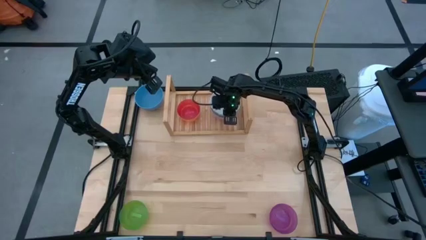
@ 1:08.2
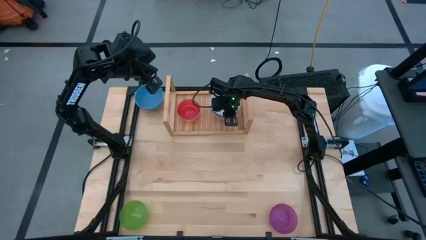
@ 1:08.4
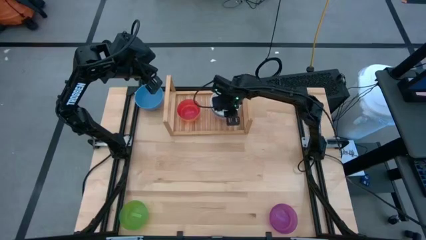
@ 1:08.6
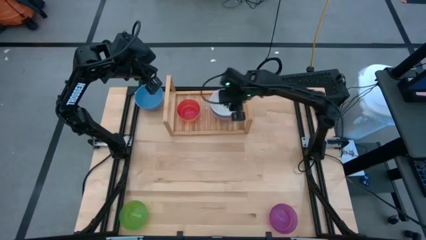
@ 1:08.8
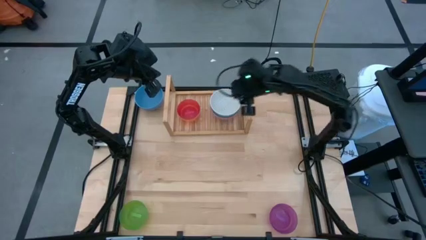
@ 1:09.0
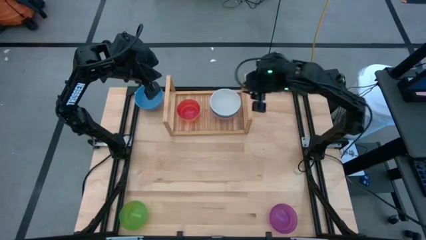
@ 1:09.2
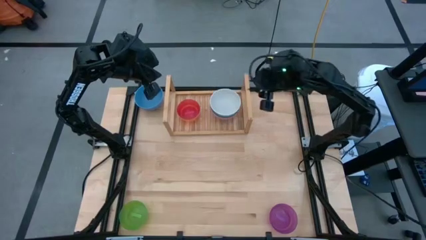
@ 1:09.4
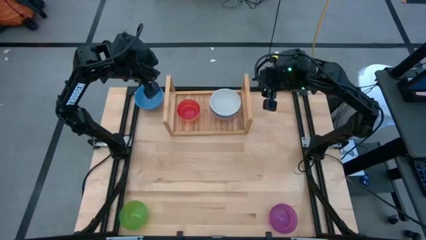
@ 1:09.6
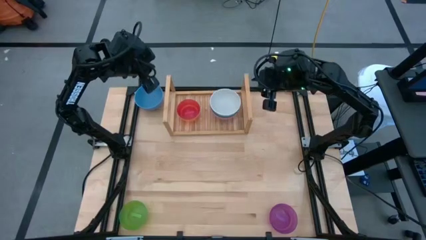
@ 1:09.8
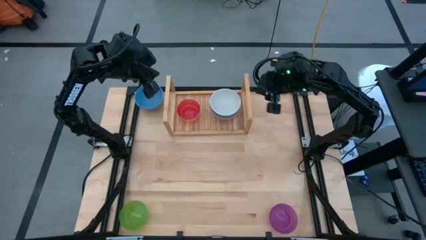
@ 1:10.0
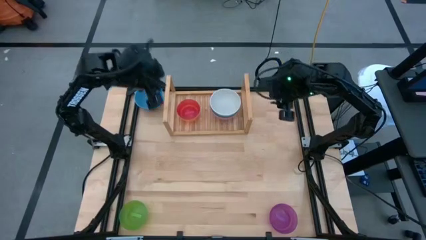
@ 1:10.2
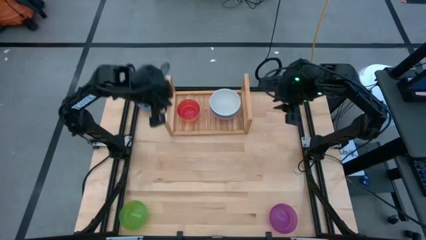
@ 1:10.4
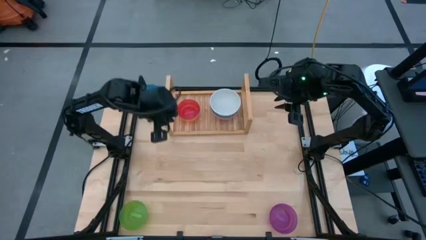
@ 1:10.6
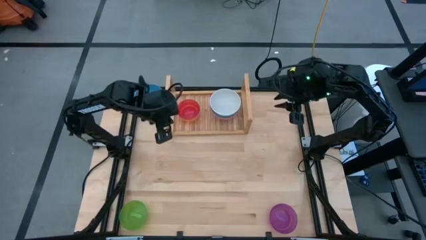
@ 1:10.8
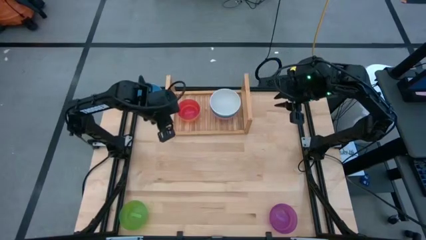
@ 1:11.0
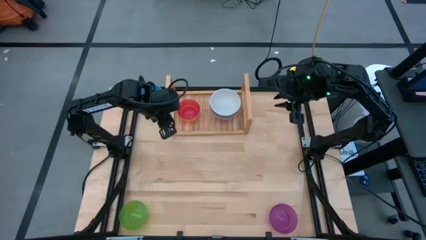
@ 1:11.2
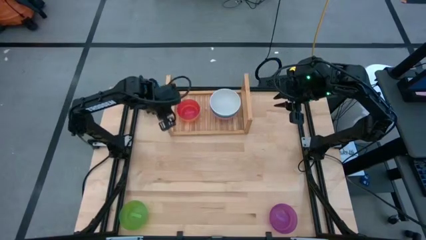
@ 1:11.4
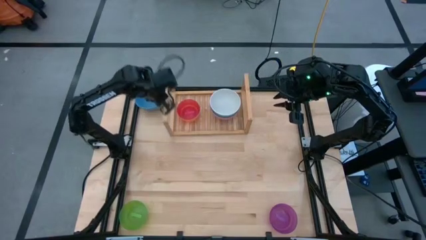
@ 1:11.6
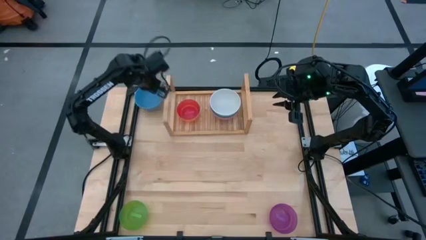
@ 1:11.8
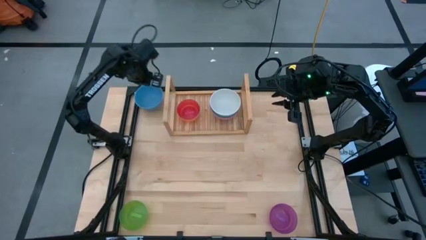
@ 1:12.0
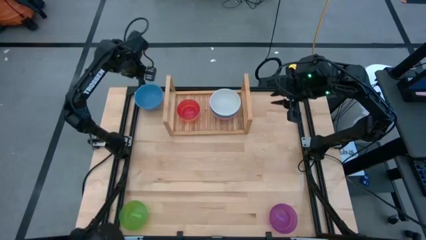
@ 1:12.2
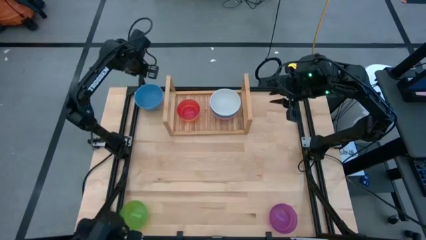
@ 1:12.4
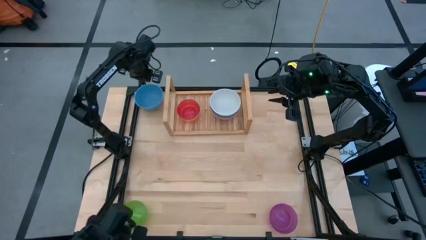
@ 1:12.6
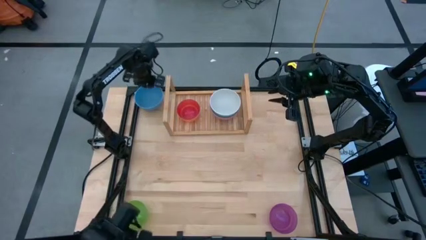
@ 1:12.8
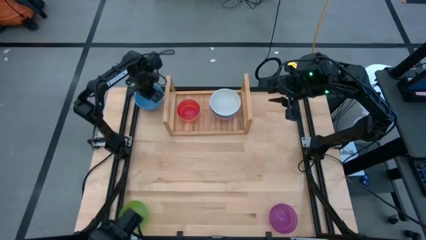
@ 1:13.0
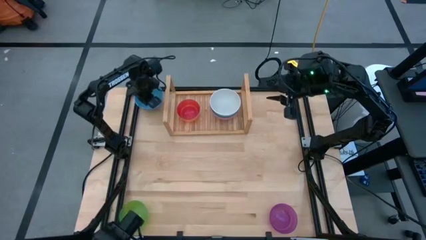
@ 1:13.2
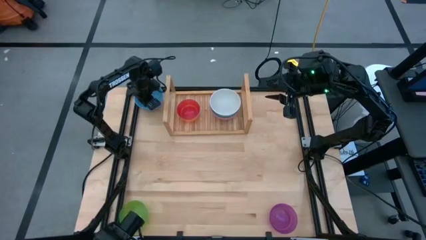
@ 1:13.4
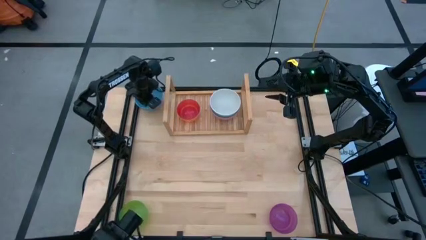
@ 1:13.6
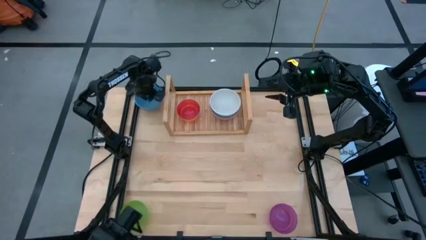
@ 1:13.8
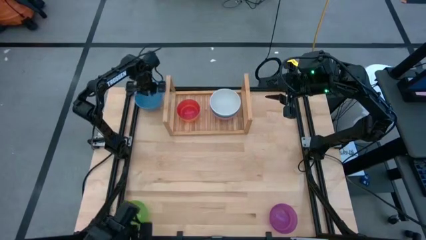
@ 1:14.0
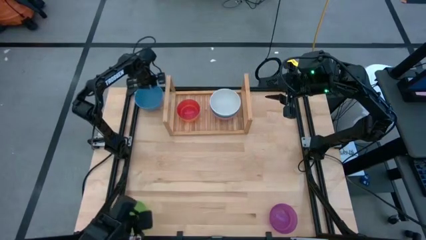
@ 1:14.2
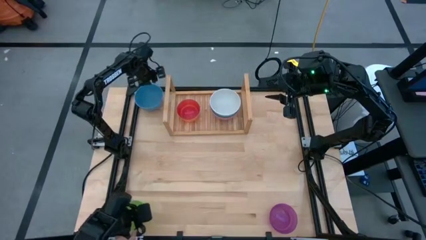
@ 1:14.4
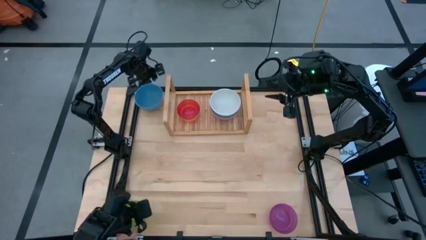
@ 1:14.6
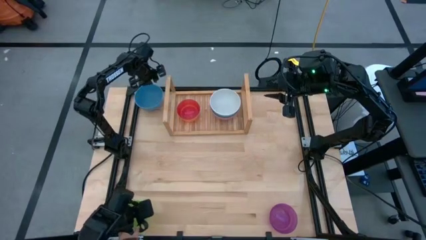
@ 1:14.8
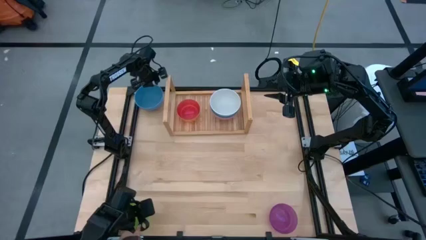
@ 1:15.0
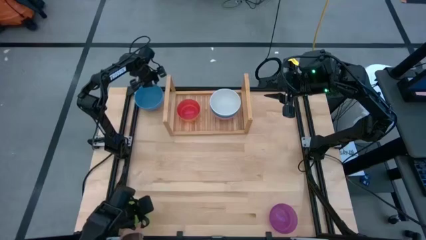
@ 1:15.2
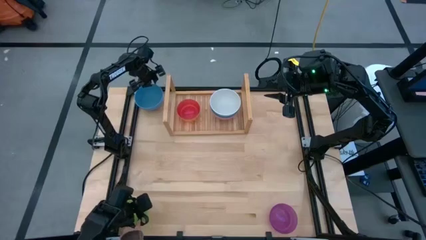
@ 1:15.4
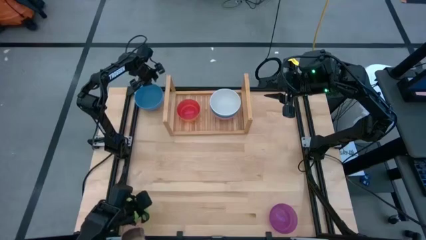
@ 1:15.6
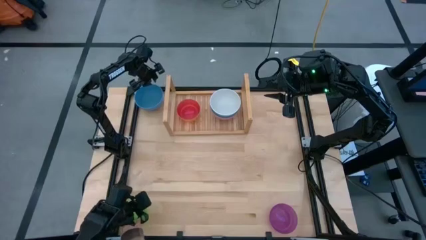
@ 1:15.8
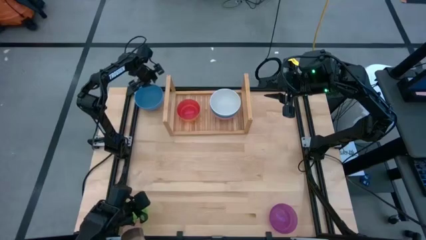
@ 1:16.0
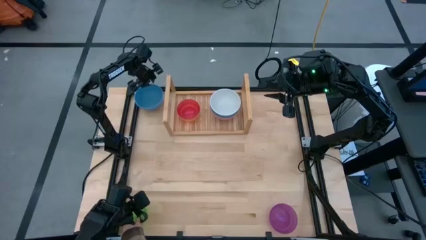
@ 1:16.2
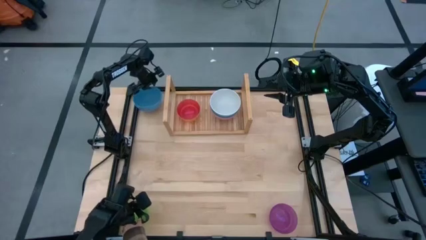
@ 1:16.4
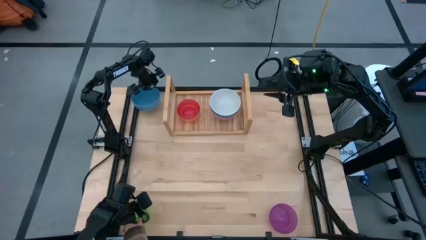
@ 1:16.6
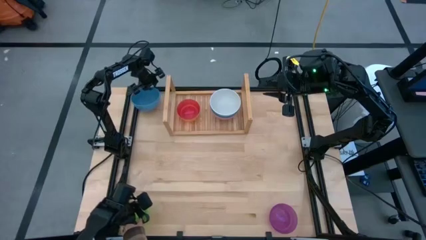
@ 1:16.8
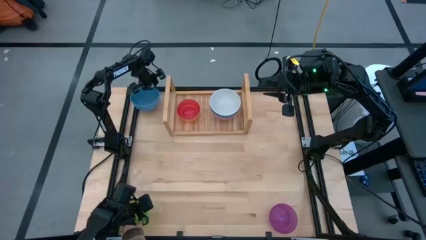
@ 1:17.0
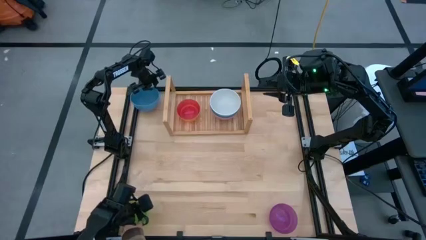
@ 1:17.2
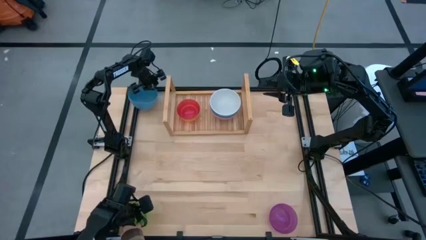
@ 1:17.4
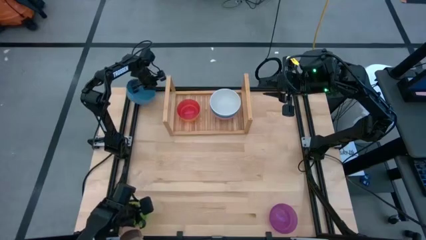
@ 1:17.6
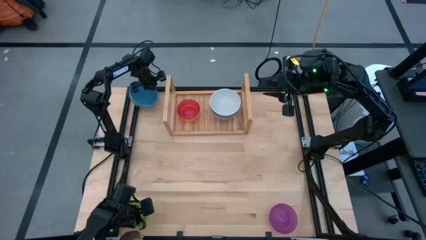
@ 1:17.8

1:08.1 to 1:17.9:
Task: Place and stack bowls onto a shelf
Stack the blue bowl onto the white bowl

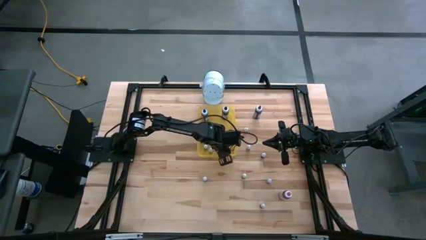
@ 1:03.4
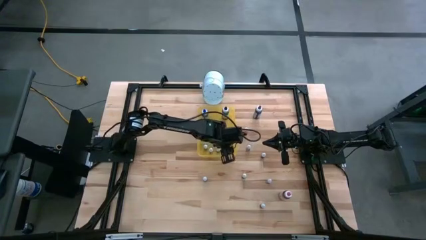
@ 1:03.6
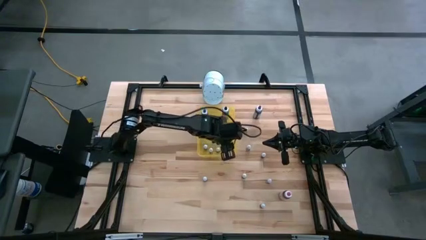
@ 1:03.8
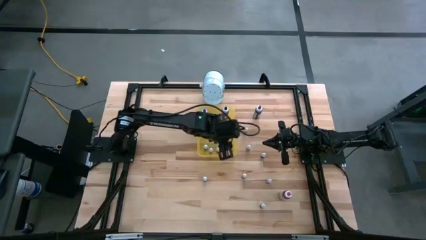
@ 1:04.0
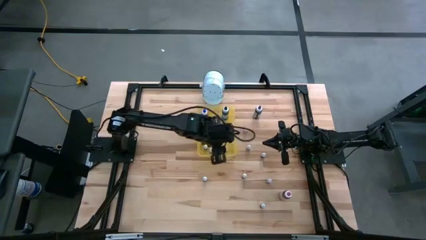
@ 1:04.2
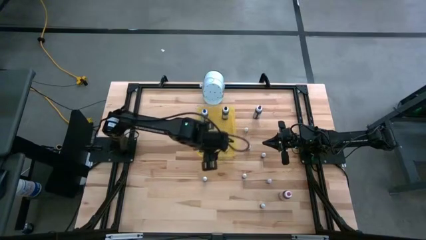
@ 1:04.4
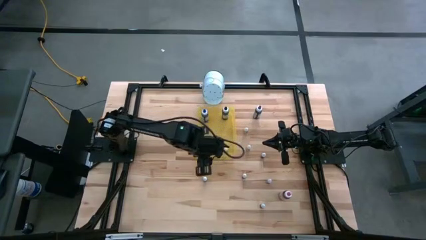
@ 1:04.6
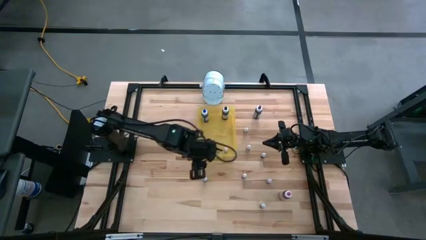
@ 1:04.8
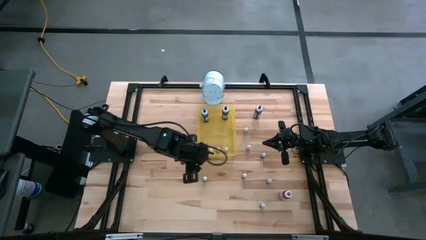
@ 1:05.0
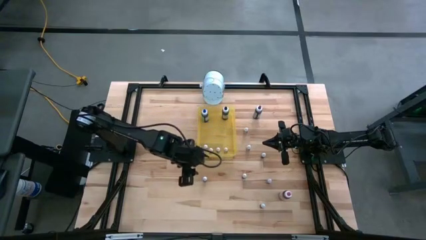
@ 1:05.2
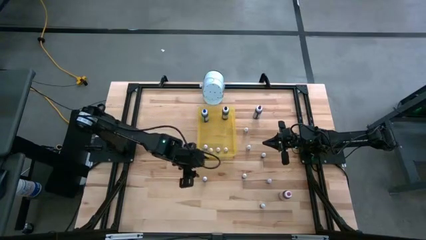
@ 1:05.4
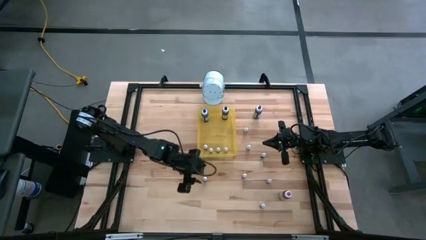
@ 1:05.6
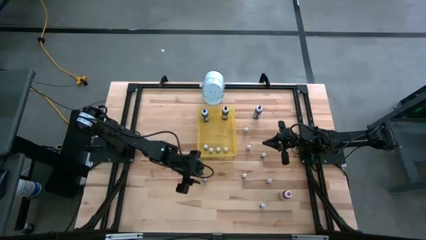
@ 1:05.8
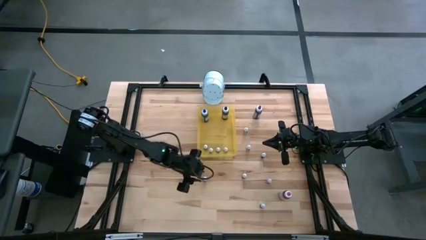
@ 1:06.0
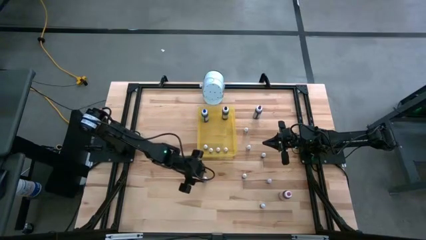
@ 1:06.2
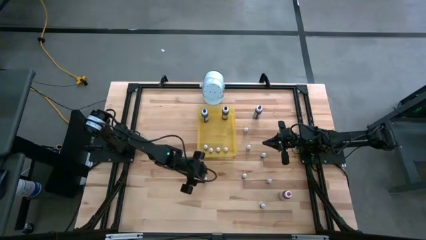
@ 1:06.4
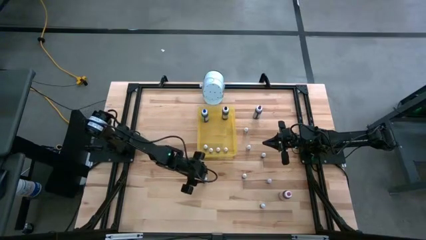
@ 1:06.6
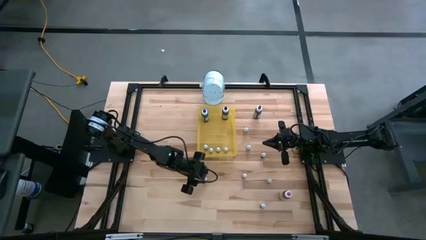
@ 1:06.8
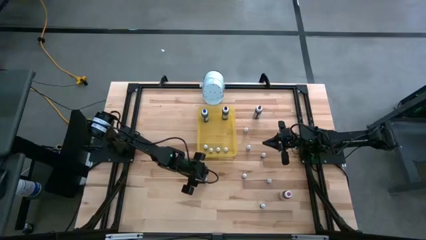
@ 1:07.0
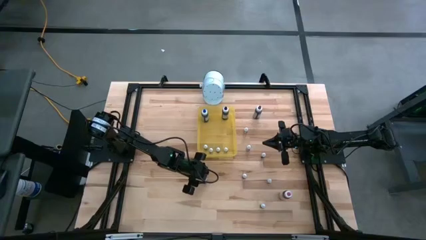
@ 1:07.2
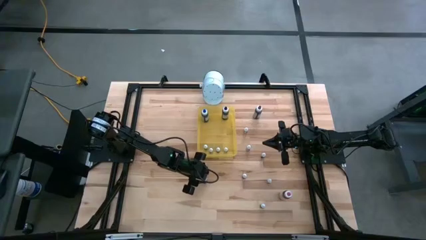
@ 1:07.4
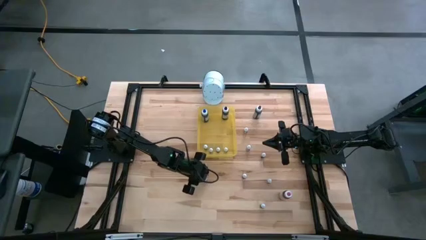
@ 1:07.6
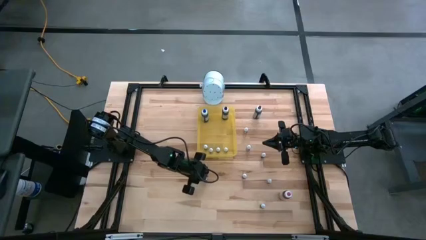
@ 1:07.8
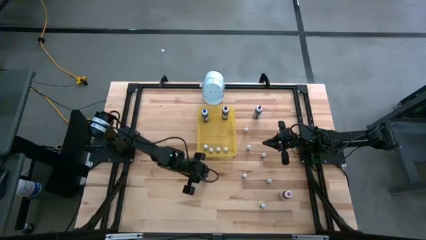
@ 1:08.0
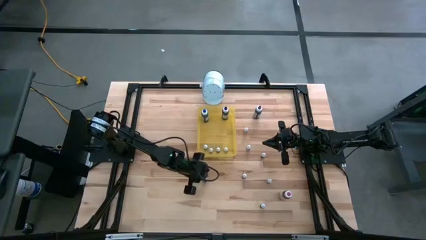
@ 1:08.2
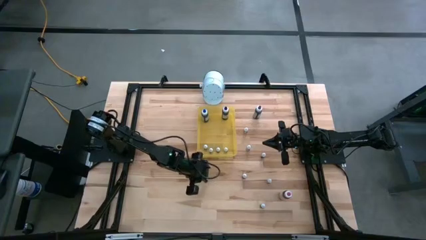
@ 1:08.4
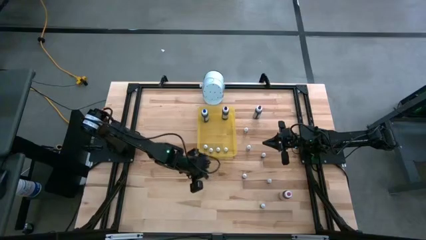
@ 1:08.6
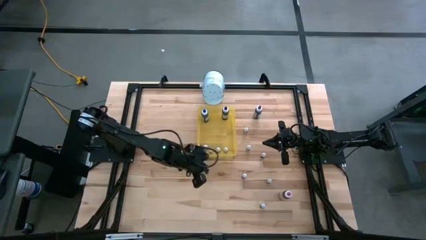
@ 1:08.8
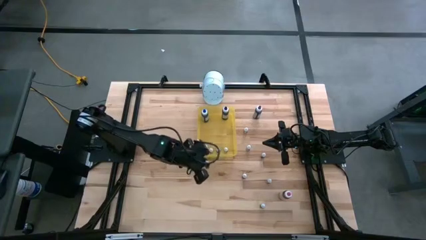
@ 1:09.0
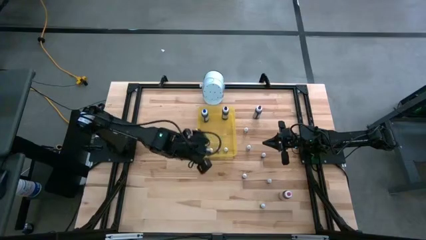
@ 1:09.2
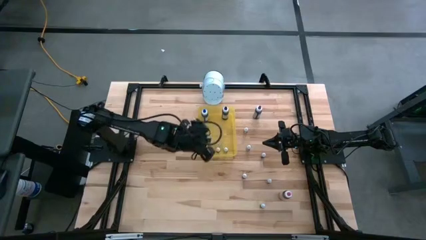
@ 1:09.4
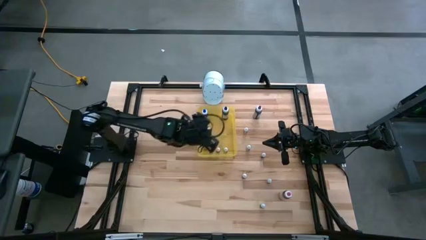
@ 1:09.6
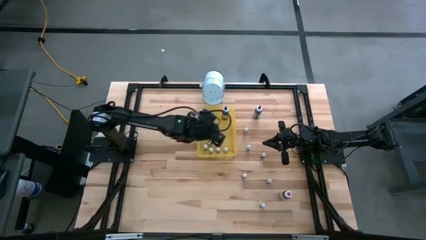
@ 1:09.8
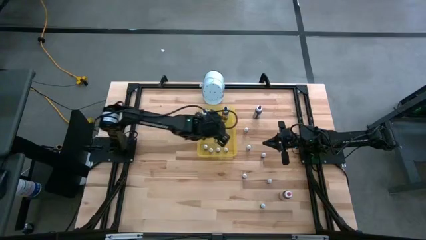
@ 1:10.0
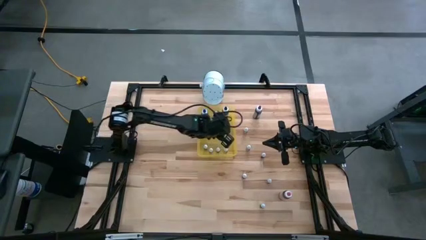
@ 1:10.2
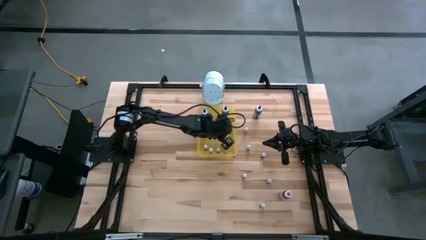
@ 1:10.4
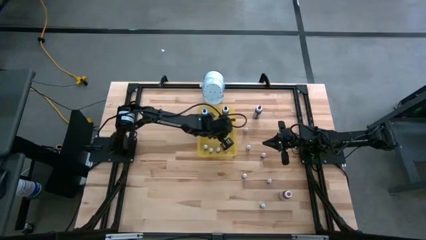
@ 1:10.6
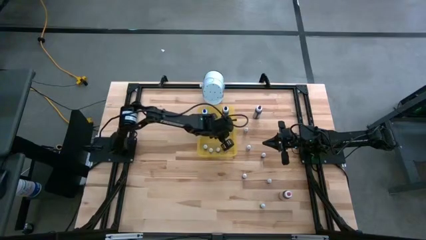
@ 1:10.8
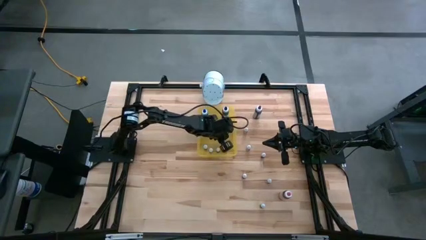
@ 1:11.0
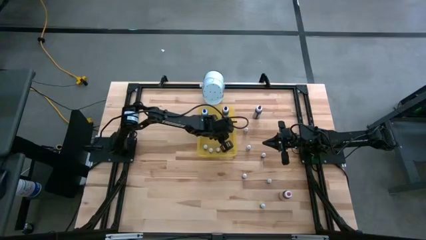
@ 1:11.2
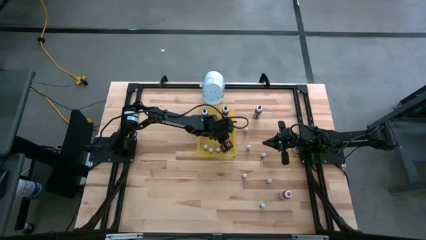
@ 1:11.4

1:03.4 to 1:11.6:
Task: Pick & Place food coloring
Put the small red food coloring bottle in the yellow transparent bin
